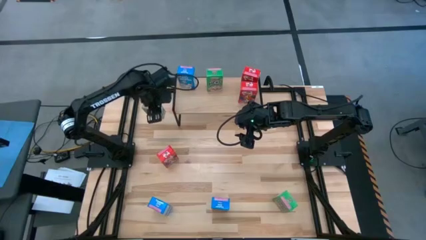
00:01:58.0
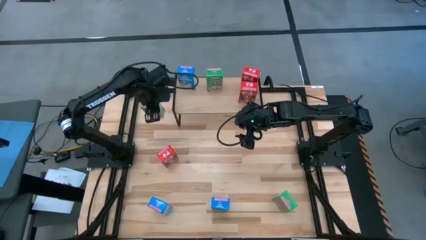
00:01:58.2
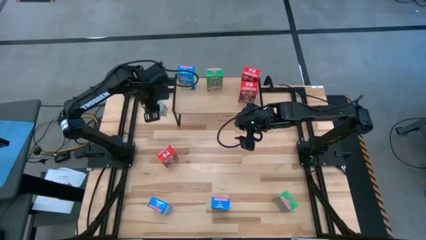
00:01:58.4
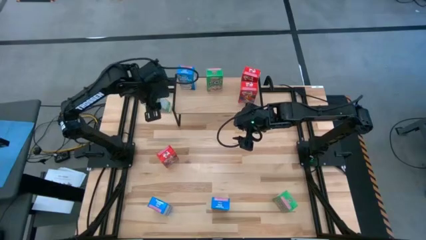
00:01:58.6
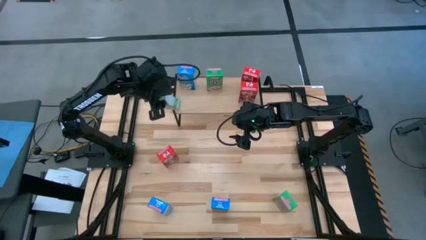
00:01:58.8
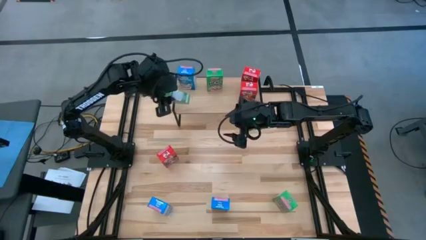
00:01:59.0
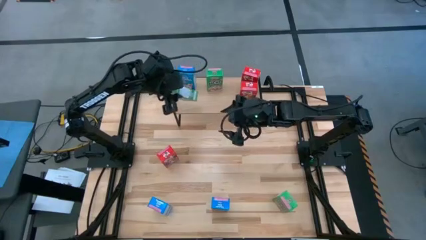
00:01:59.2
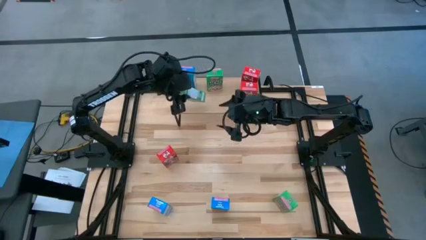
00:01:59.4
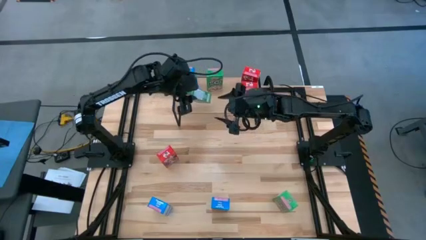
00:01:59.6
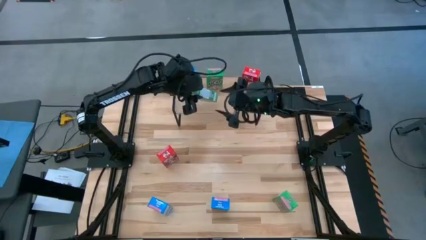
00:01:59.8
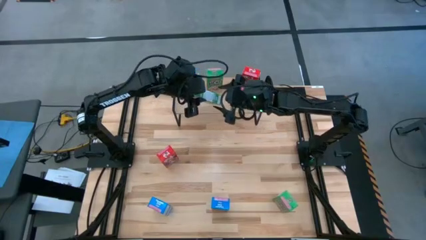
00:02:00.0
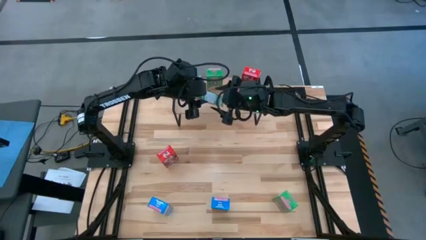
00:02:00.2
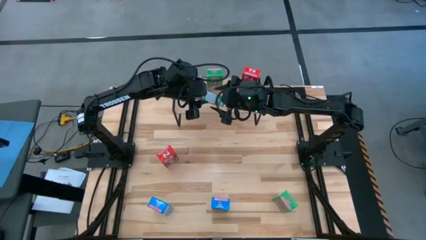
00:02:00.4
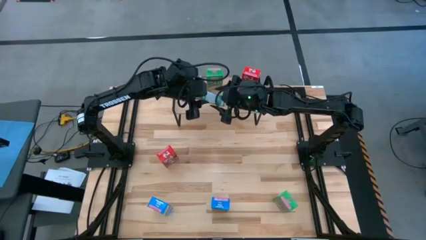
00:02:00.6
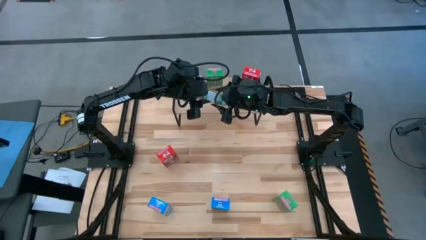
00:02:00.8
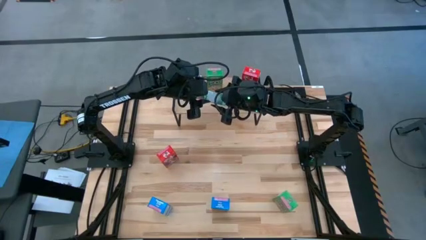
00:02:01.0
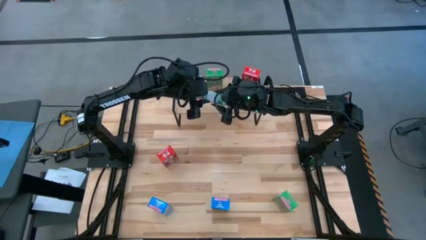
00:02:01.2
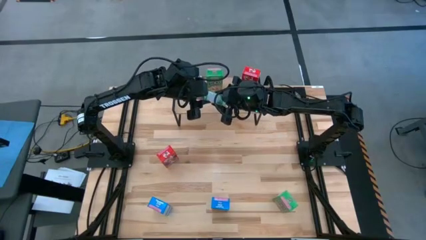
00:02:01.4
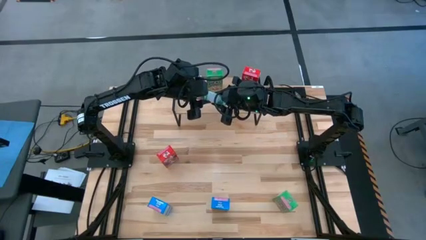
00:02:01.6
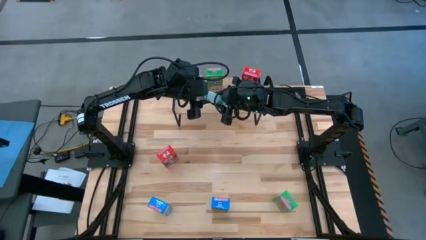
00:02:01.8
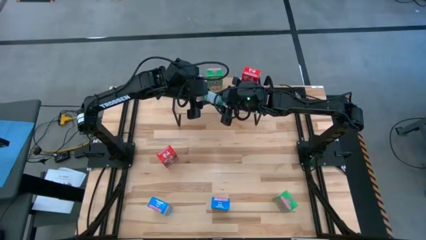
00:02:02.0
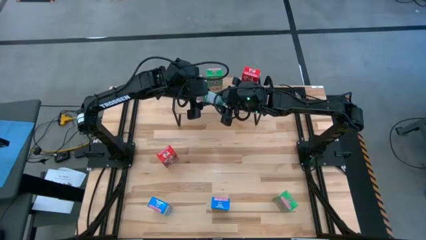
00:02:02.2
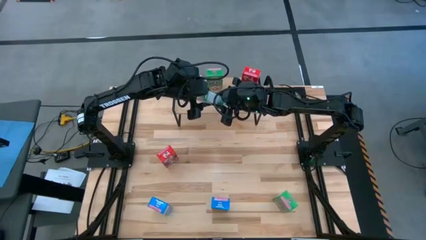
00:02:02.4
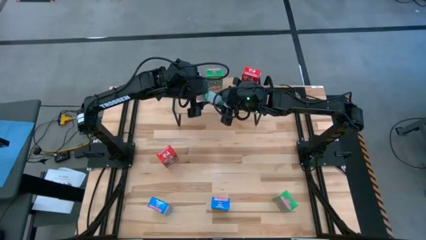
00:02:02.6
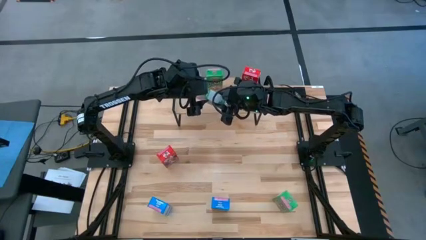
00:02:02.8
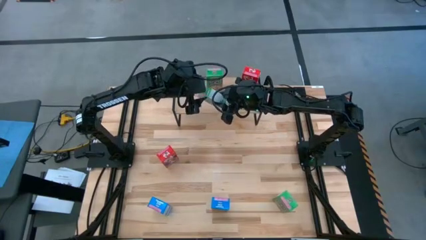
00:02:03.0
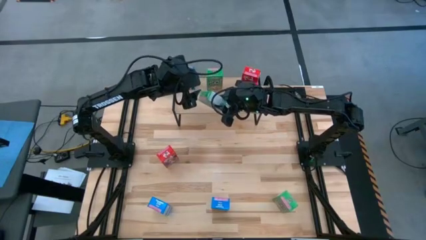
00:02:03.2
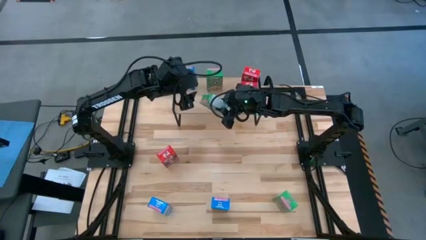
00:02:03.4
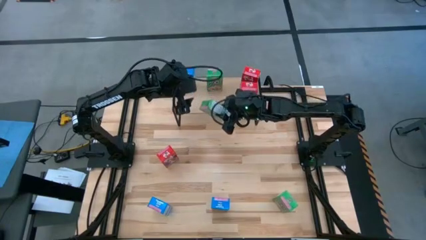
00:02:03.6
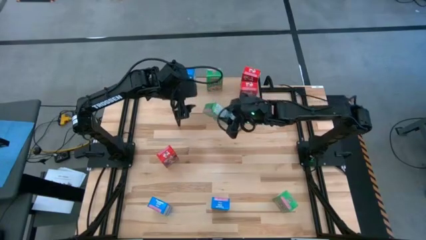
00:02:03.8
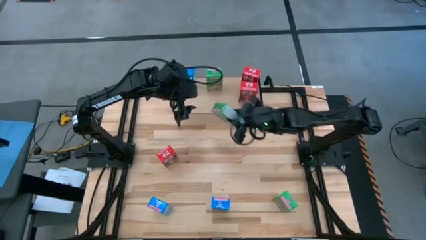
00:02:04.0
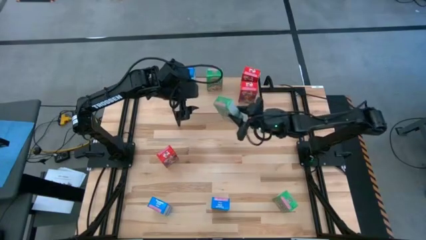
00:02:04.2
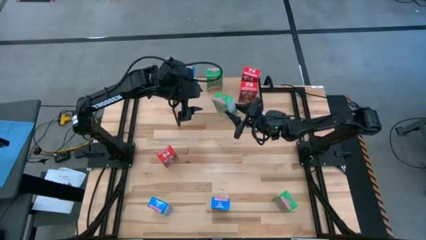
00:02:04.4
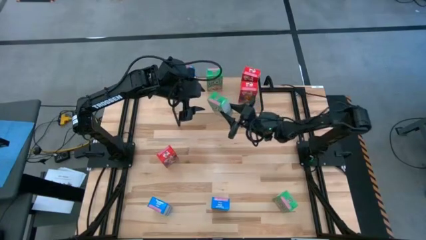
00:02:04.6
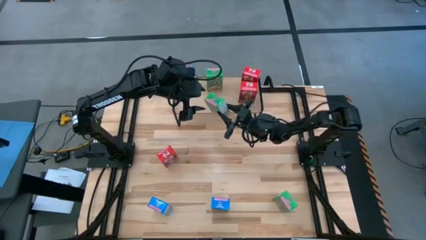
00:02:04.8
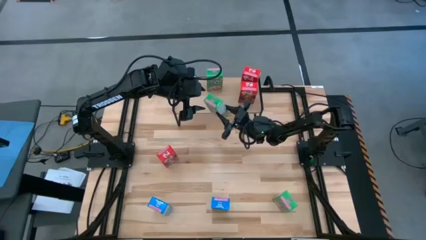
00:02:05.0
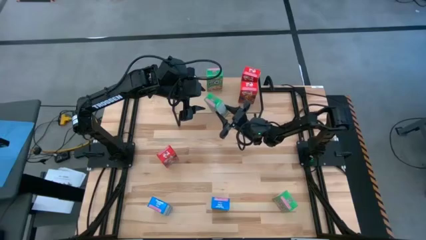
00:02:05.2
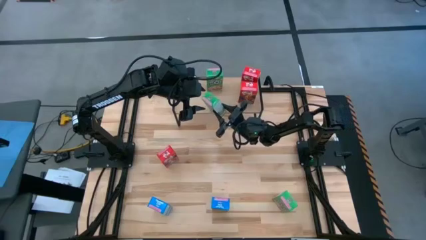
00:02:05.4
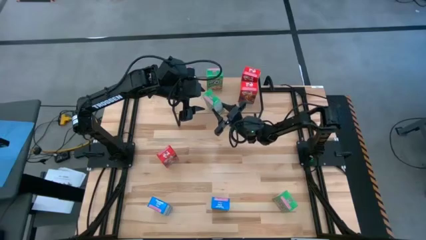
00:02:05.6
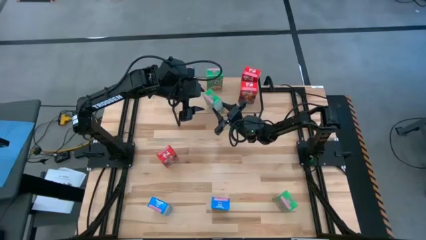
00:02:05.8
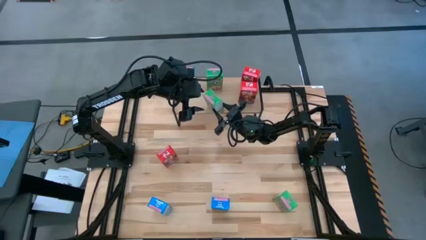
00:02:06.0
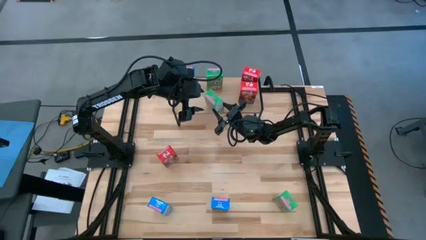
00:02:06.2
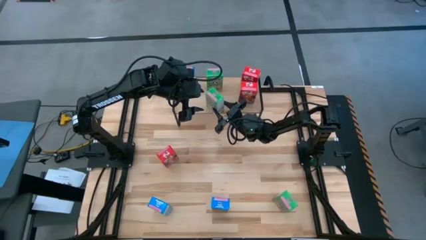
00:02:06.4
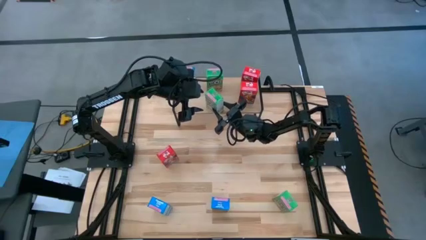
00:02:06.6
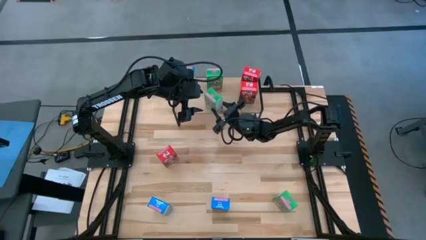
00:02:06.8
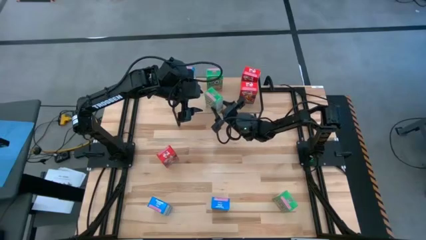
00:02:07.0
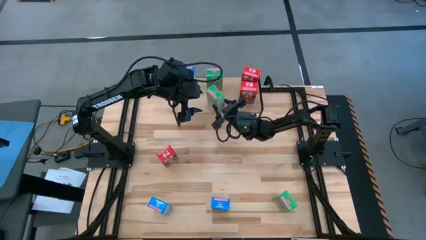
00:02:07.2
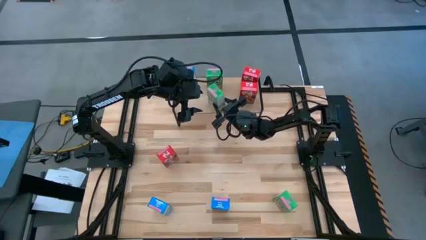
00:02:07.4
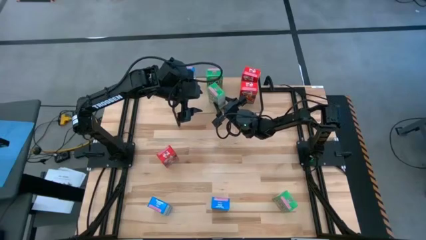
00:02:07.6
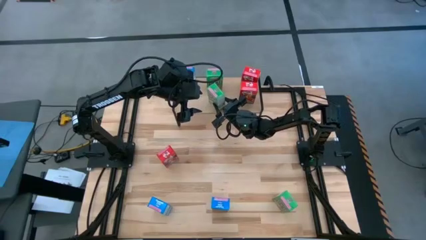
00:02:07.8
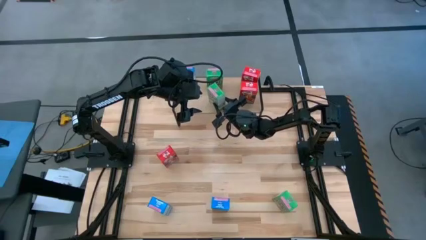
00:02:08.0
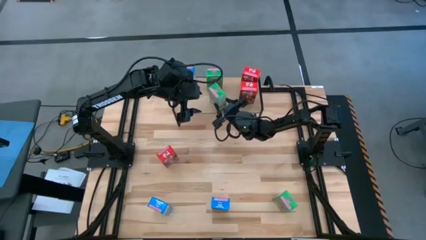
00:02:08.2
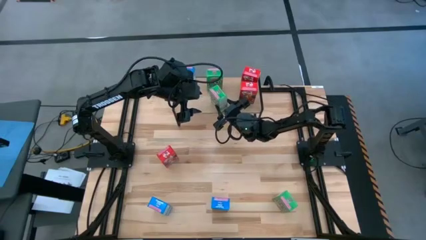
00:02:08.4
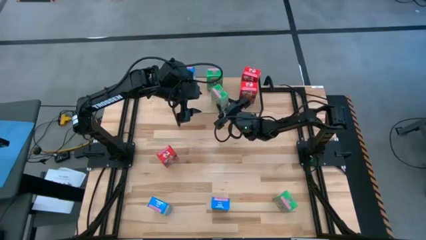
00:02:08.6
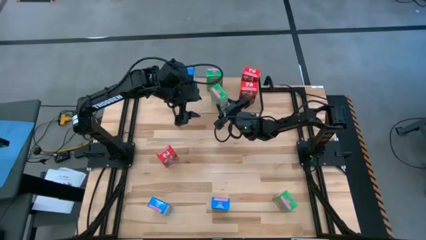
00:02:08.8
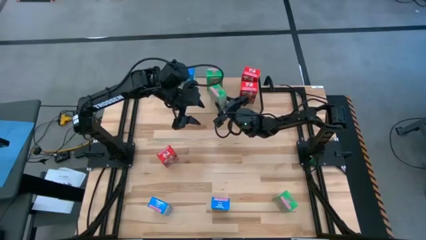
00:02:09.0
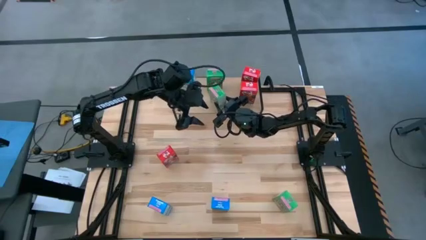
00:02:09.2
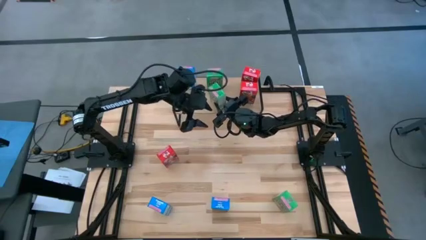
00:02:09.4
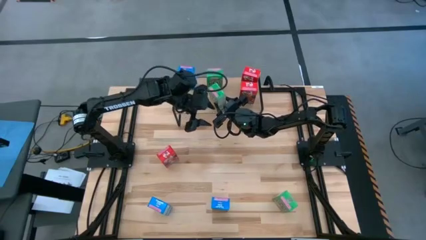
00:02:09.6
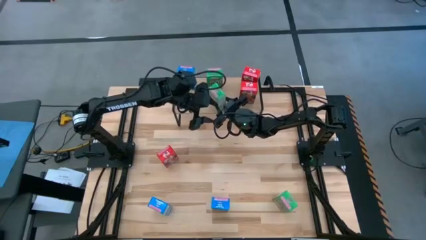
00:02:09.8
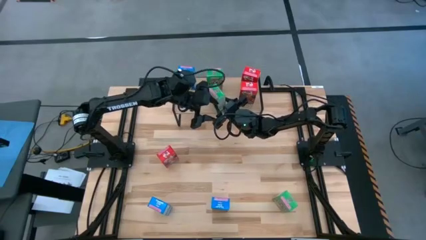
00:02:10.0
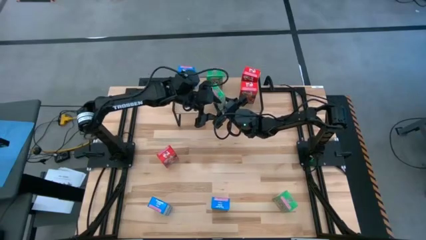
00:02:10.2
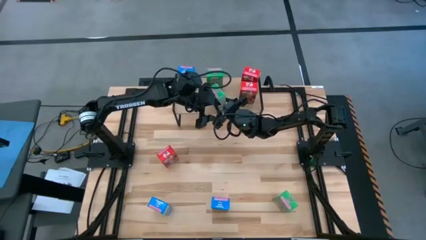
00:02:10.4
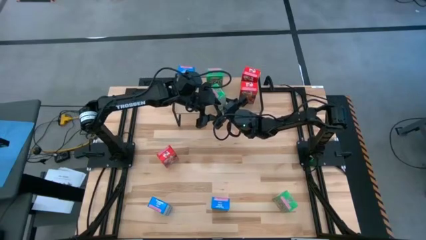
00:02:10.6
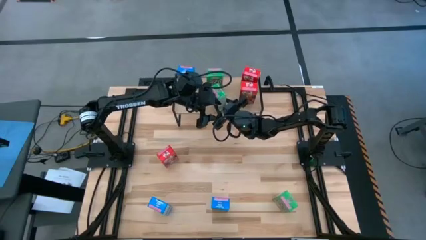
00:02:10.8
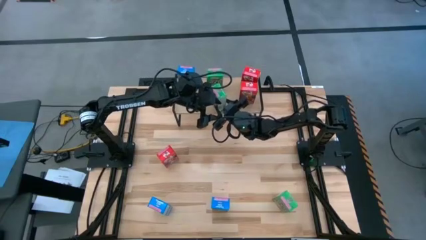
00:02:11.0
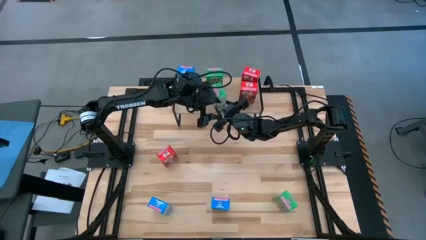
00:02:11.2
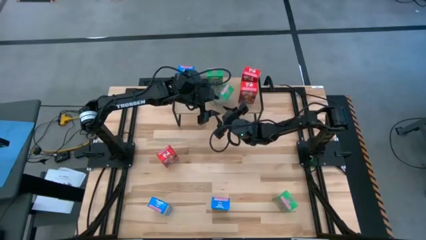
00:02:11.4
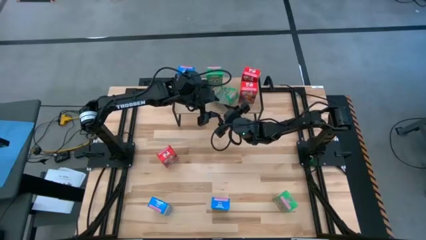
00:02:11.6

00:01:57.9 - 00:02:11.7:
Task: Stack cereal on shelf
Put the top green cereal box on the shelf aligned with the green cereal box

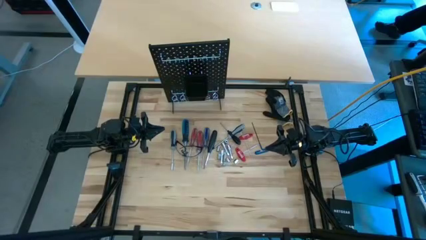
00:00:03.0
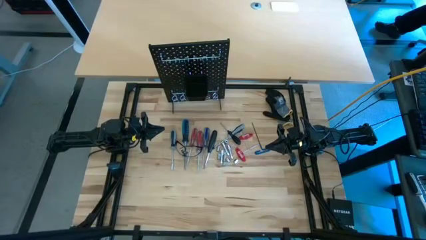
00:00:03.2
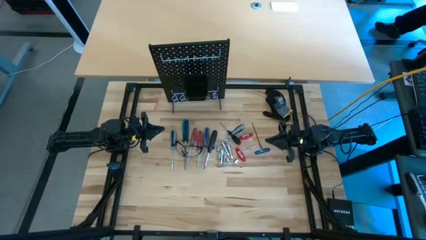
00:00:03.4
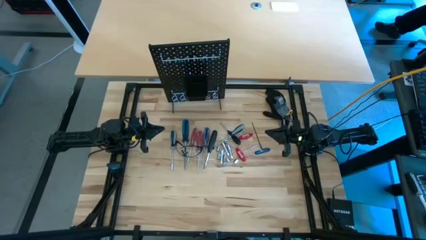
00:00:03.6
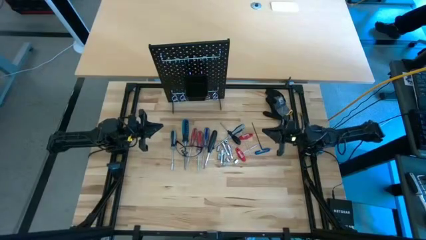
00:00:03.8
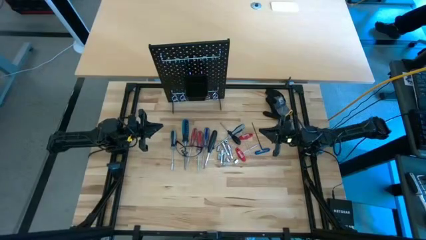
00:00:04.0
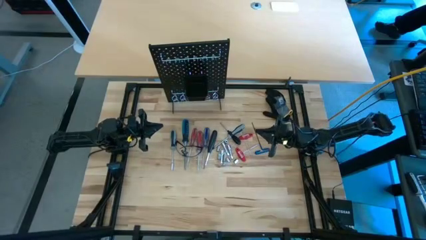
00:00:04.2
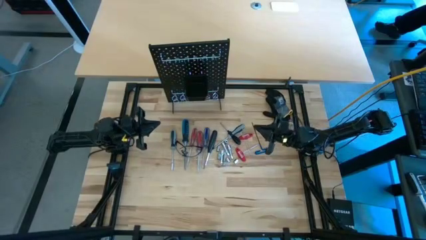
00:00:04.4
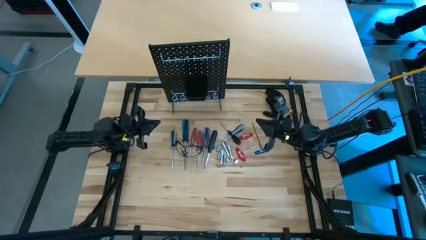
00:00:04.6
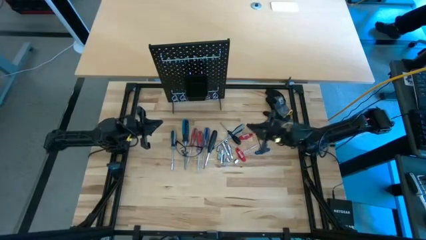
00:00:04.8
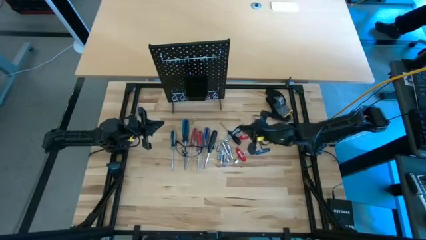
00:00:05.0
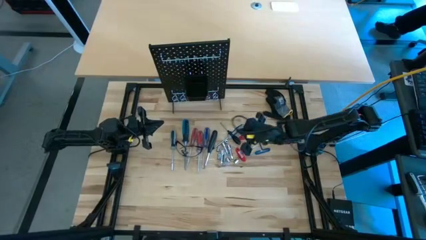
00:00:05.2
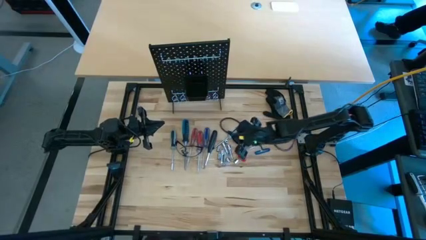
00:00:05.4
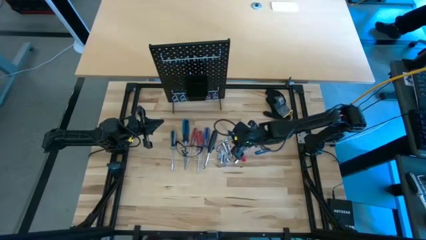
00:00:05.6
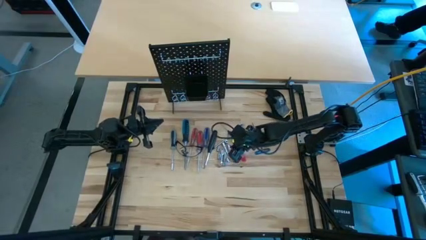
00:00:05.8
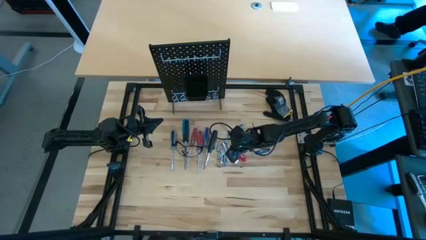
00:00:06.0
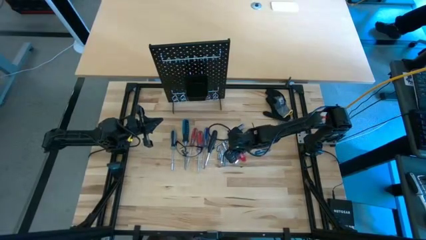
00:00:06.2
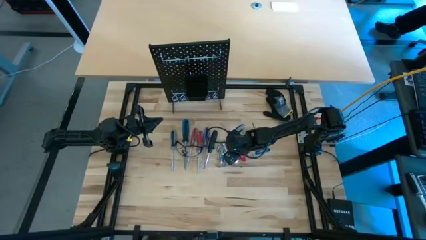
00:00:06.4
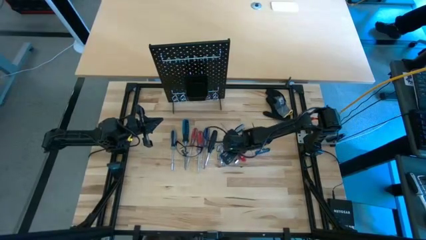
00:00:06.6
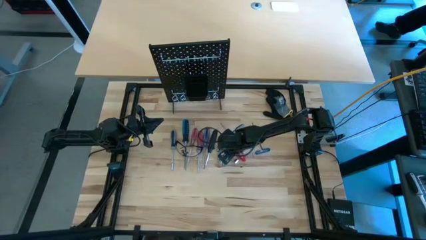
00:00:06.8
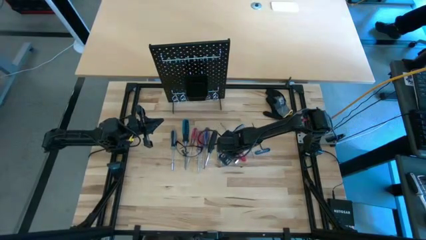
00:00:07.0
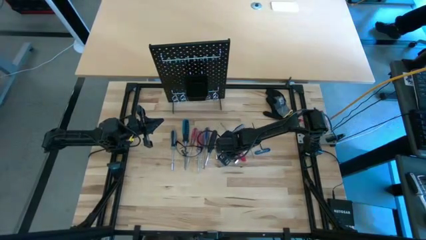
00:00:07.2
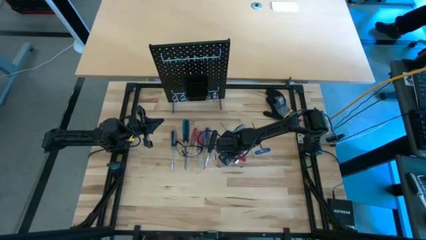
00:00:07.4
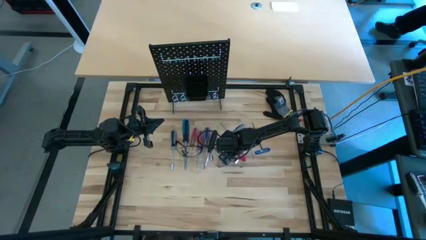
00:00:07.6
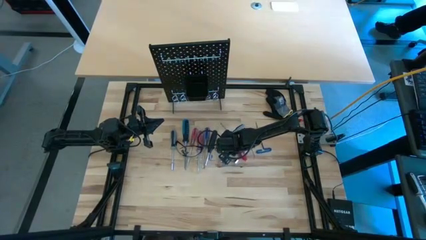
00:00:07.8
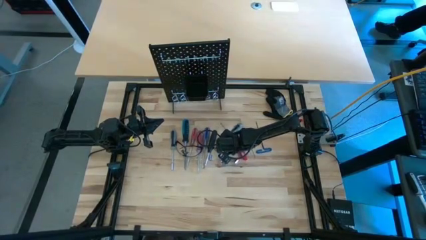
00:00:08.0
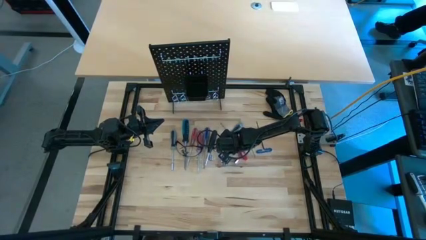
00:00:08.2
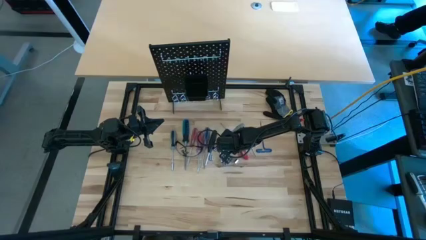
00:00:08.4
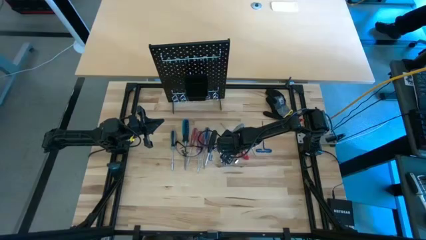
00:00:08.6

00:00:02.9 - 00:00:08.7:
Task: Hang tools onto peg board
Put the right metal extension bar into the black bin on the peg board
